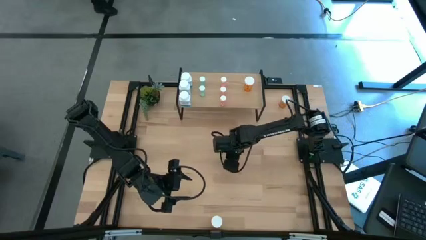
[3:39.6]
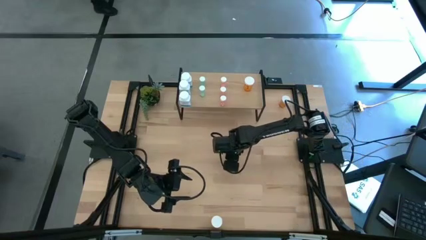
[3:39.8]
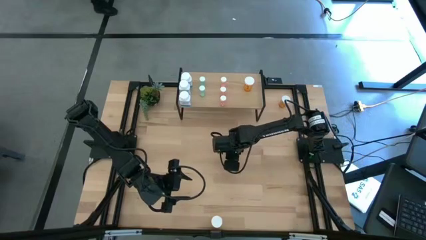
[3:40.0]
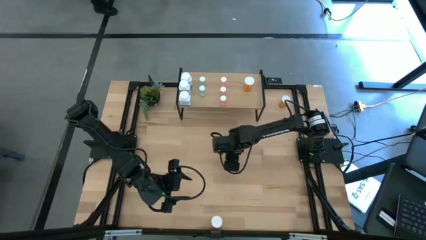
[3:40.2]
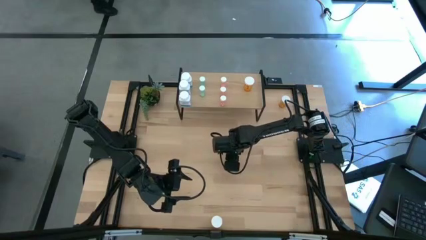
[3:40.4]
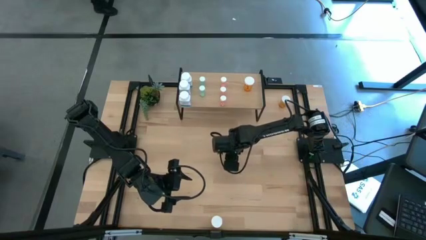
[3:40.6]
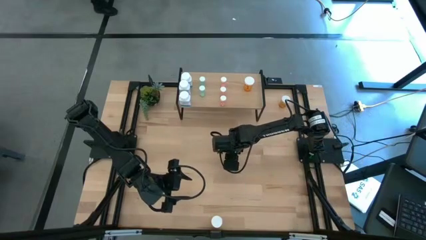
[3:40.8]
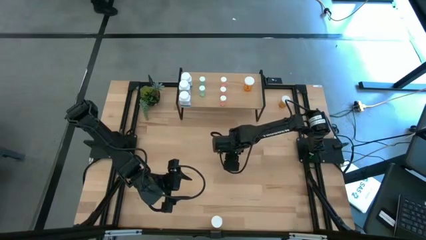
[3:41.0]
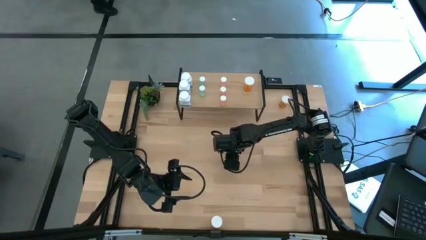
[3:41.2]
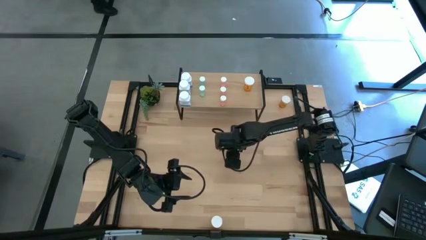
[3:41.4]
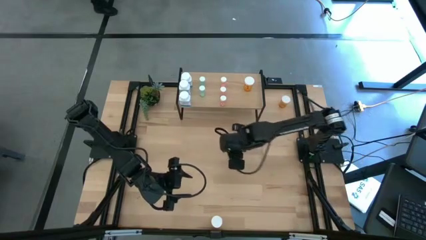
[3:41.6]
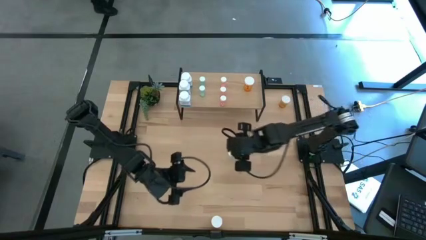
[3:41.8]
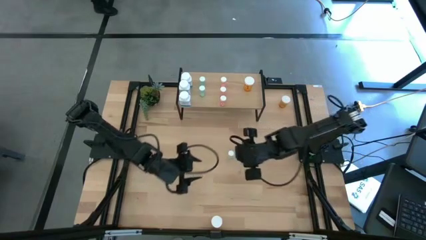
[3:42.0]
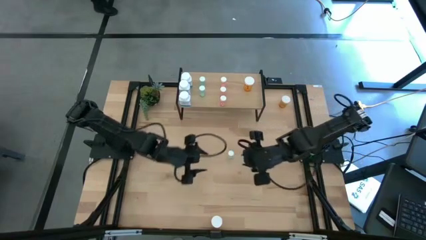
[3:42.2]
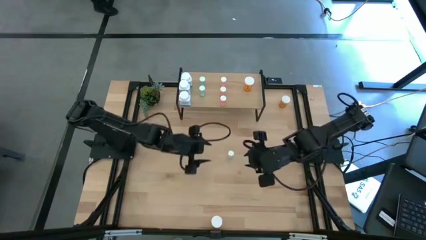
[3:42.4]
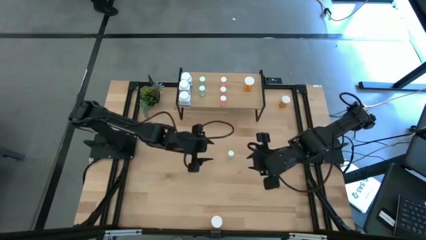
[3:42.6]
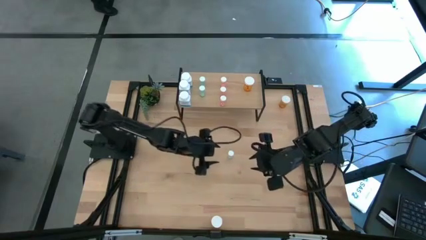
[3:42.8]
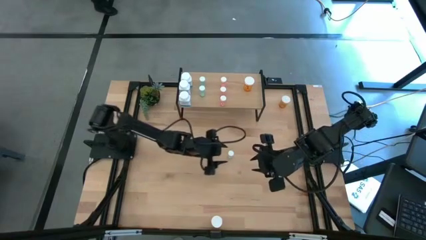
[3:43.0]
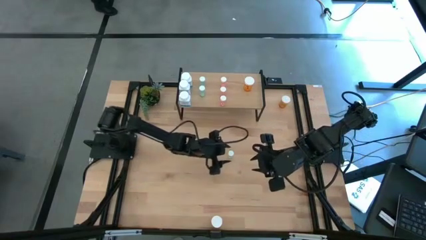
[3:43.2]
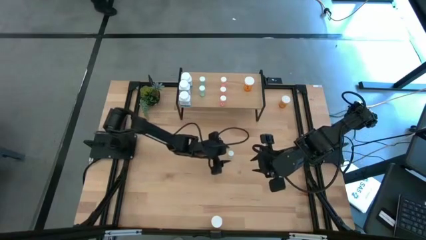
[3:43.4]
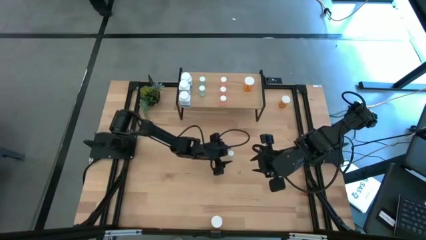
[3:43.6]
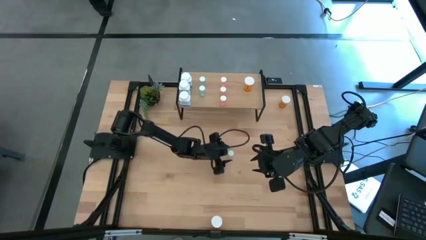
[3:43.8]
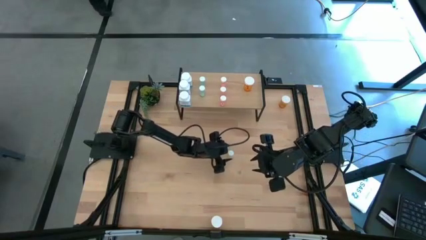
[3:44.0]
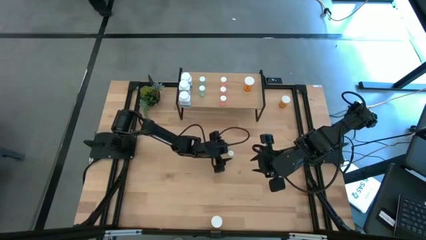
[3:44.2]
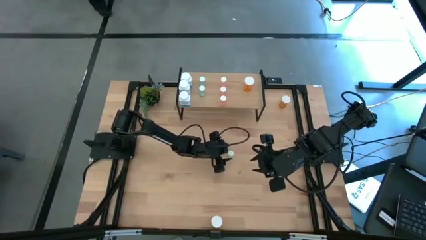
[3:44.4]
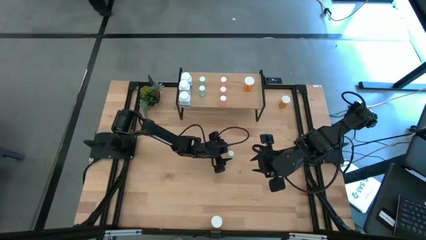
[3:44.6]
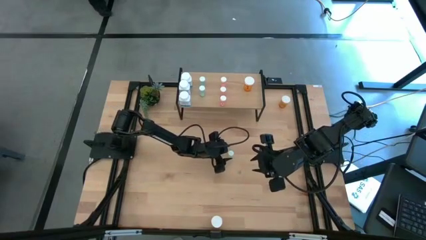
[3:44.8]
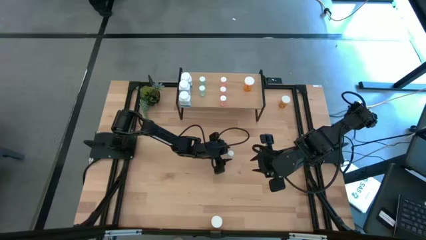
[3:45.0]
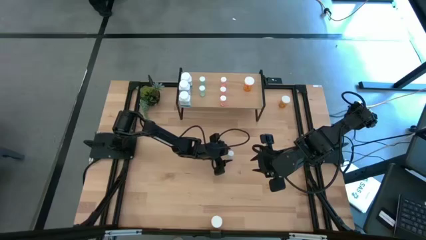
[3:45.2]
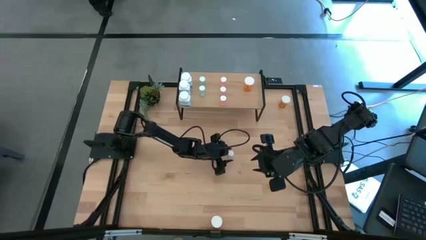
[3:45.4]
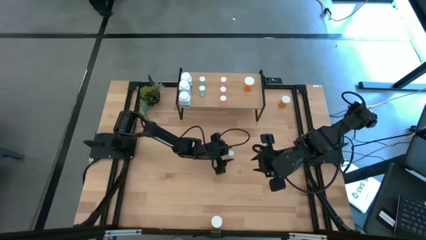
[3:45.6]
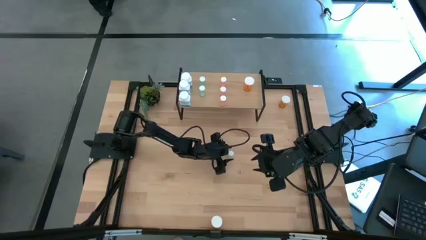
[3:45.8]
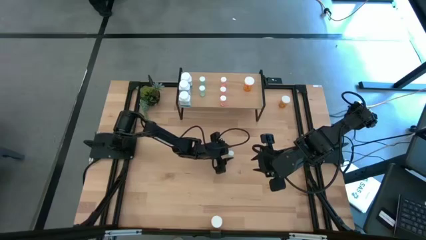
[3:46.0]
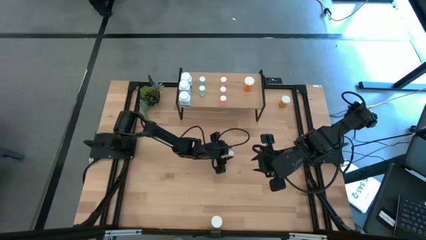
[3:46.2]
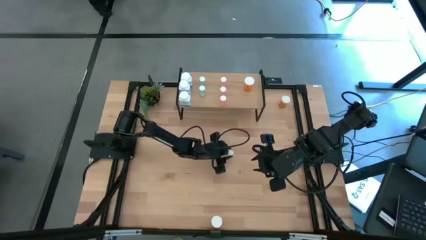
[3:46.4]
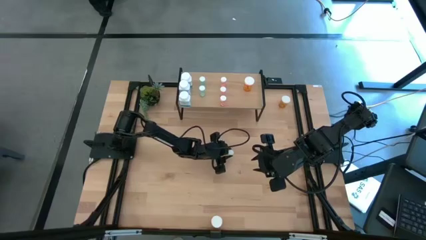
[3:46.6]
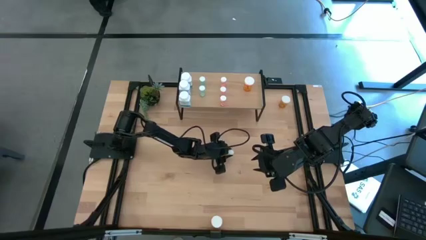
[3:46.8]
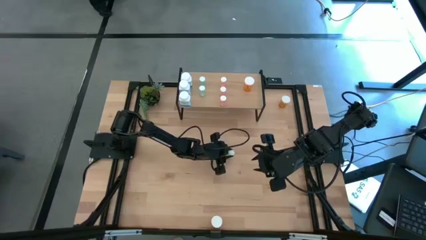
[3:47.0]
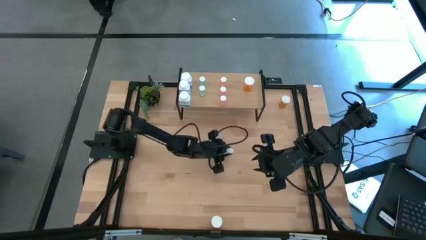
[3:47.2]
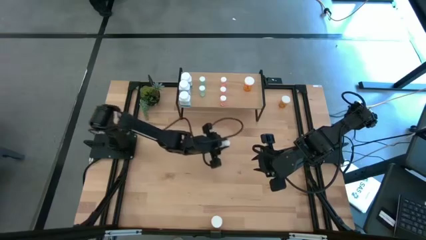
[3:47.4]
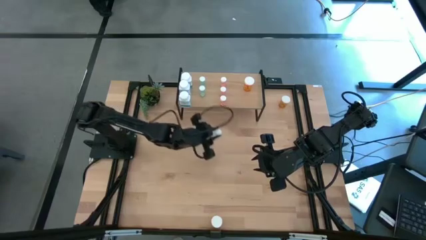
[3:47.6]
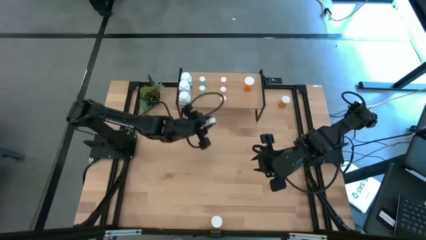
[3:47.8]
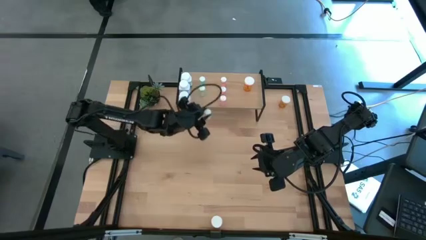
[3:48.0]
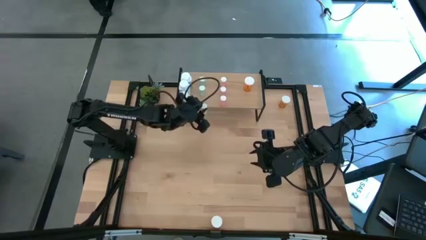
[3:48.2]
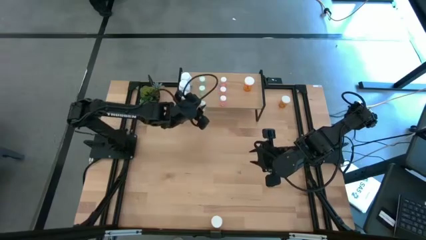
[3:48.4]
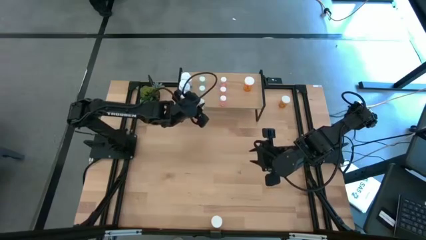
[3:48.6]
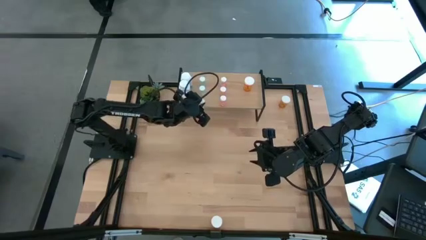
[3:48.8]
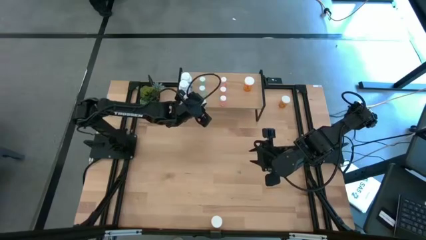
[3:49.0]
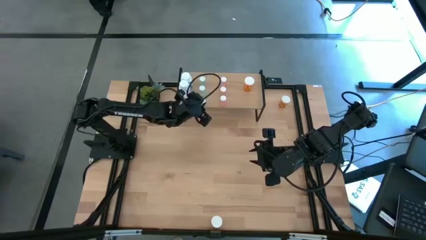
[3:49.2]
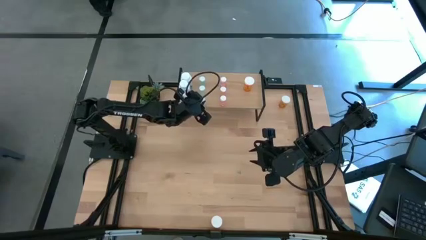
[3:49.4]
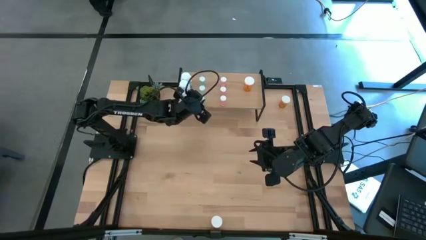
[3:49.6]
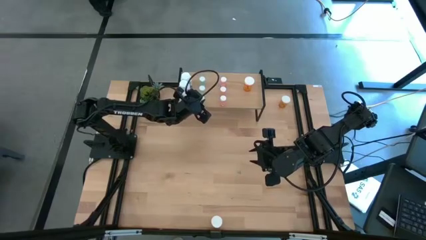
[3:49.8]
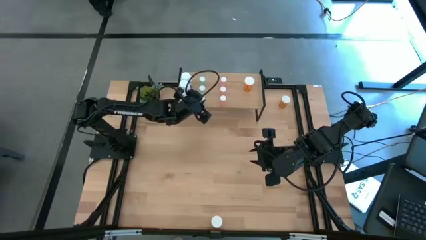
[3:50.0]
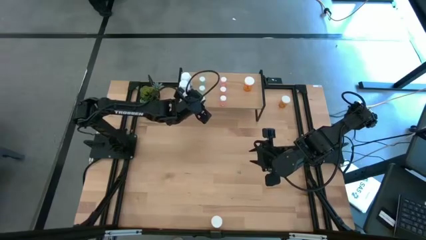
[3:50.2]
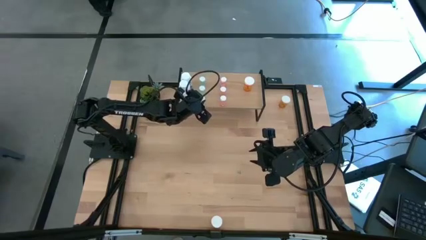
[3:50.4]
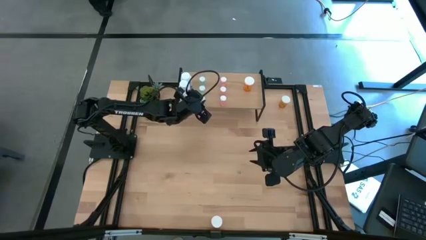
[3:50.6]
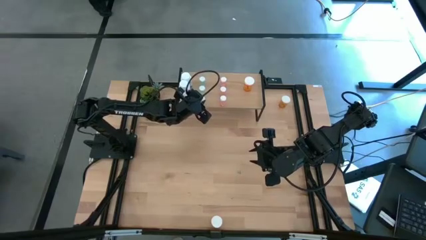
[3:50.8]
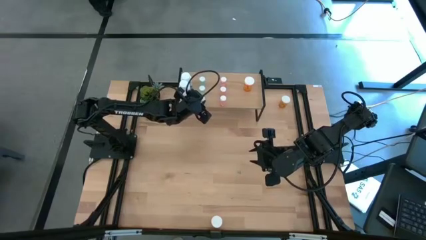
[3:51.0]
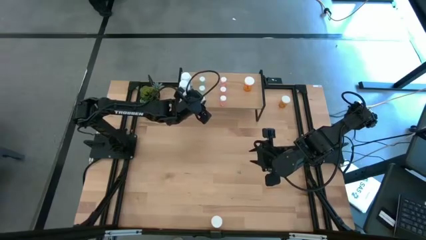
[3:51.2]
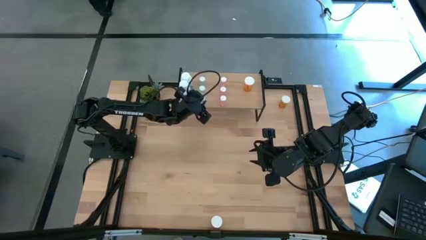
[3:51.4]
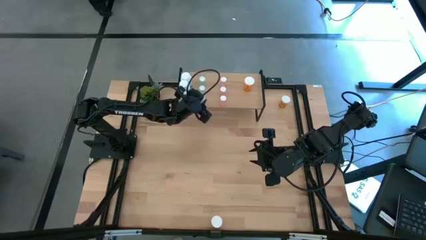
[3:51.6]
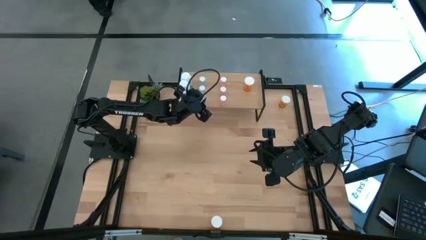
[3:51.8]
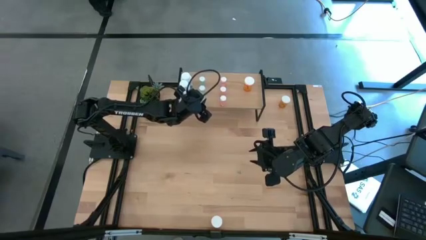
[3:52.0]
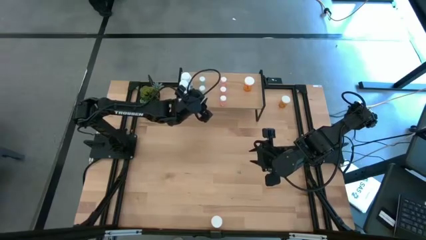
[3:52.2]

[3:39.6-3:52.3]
Task: Pick and place medicine bottles onto shelf by color
Put the blue pill bottle on the shelf aligned with the other blue pill bottles

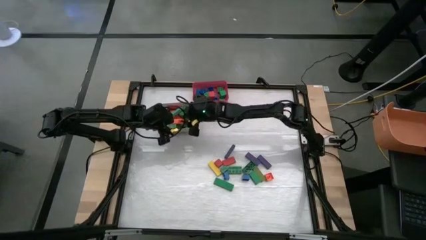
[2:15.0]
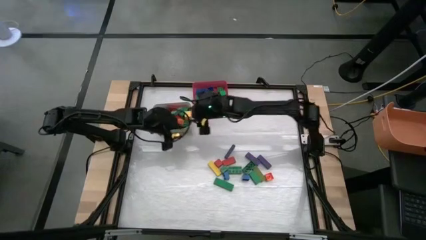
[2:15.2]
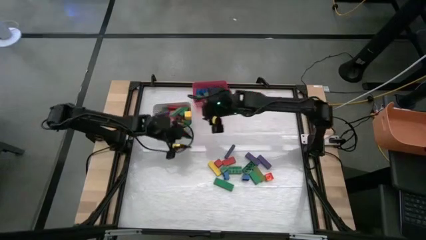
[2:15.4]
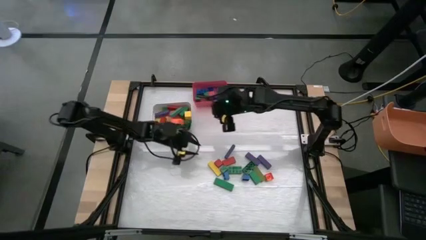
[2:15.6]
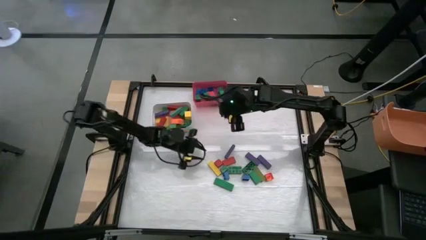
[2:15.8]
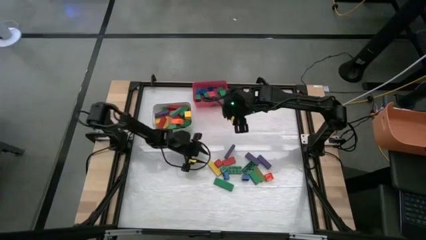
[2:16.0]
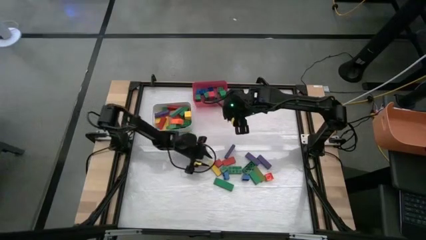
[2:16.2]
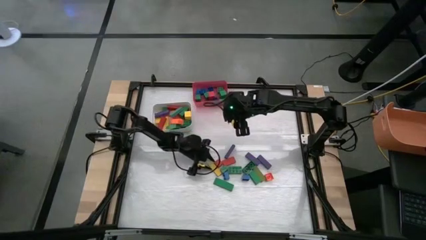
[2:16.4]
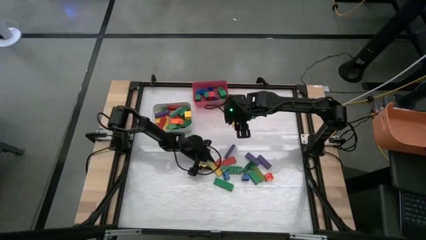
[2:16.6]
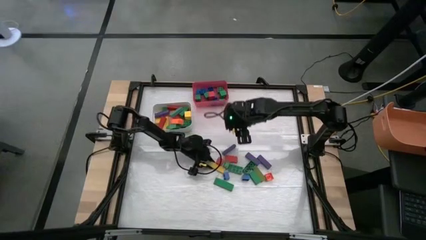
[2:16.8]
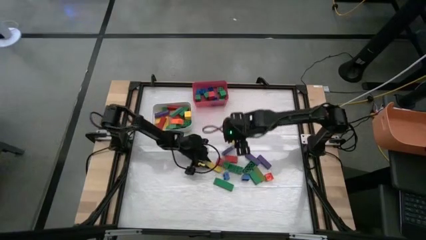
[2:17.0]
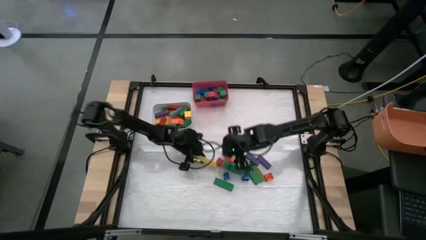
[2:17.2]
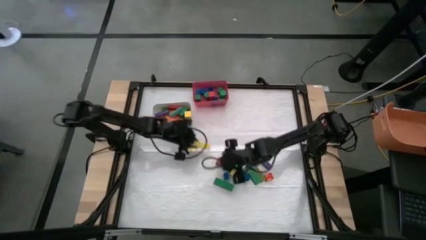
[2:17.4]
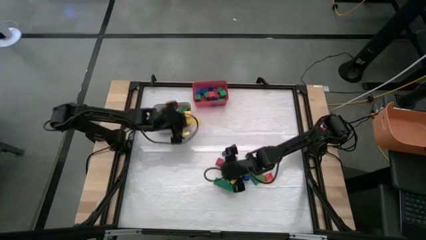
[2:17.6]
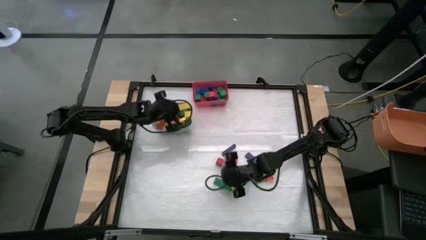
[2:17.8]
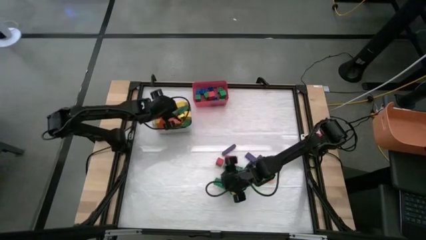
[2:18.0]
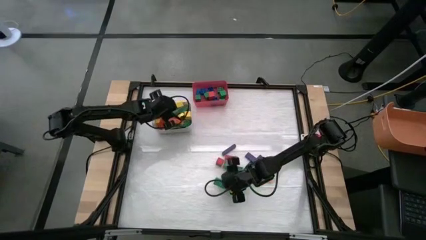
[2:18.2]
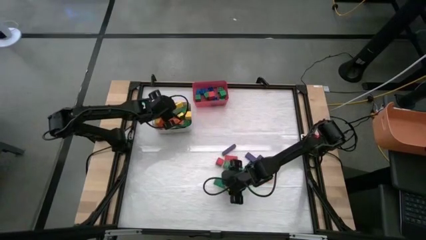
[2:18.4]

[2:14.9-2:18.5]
Task: Sort blocks by size
Put the large yellow wooden block into the white bin

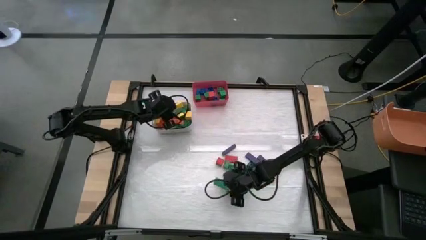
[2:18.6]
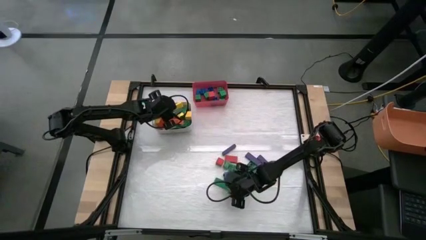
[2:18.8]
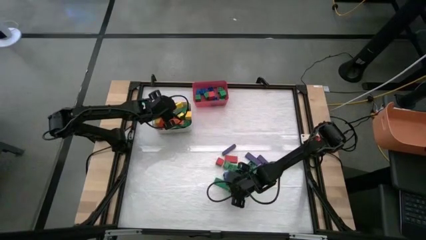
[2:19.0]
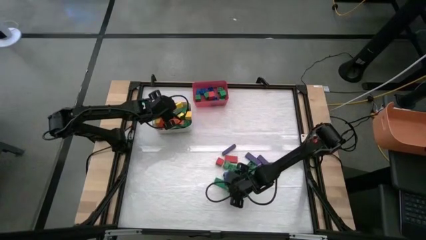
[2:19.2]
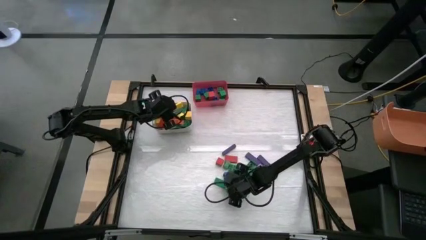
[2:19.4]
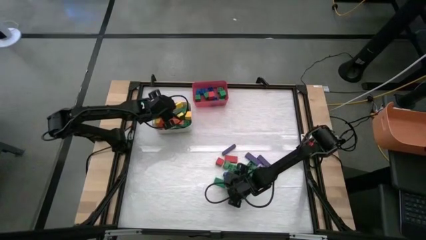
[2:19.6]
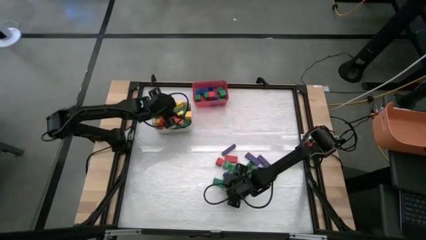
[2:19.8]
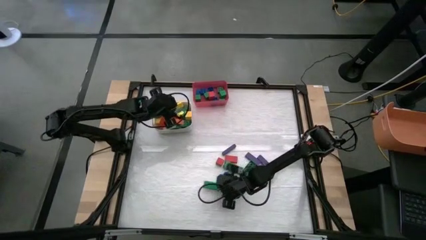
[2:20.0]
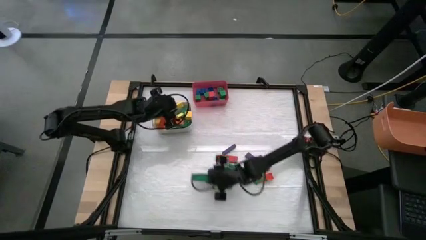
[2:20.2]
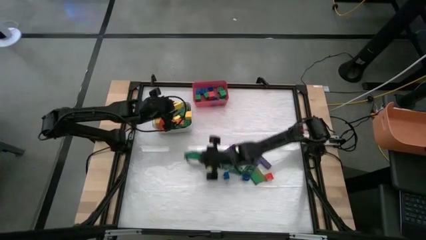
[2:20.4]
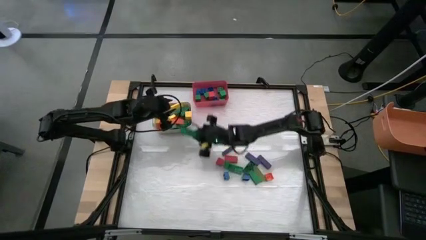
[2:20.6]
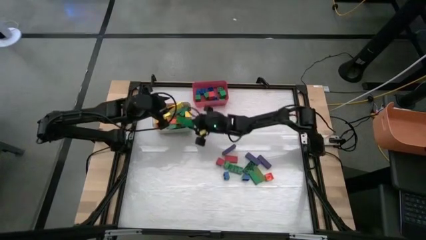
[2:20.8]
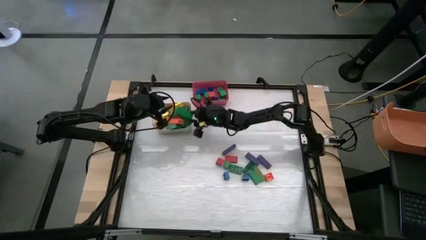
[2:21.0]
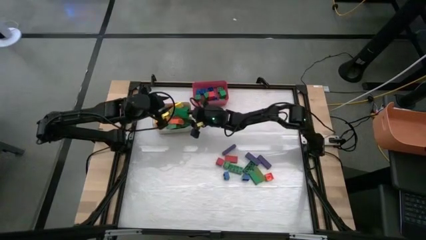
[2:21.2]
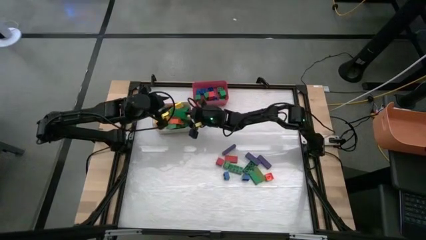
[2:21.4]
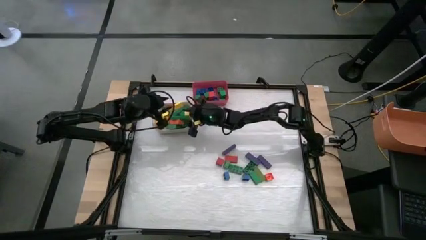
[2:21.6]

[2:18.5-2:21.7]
Put the large green wooden block into the white bin
